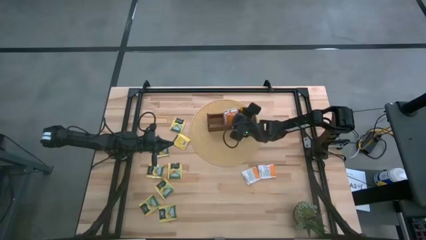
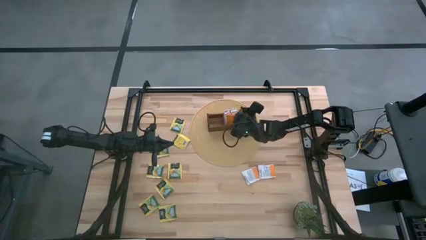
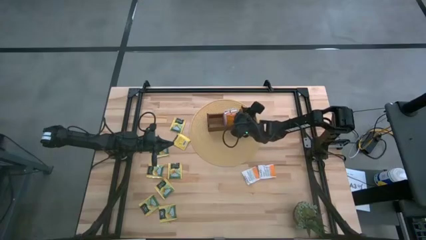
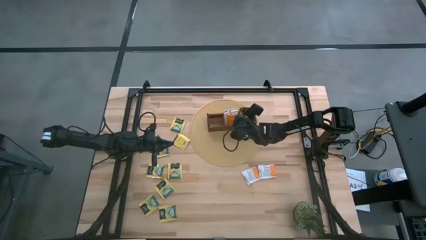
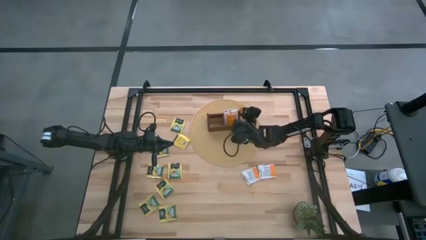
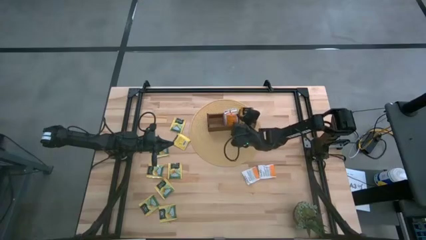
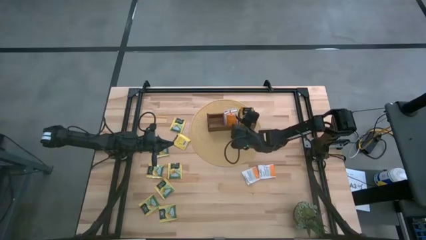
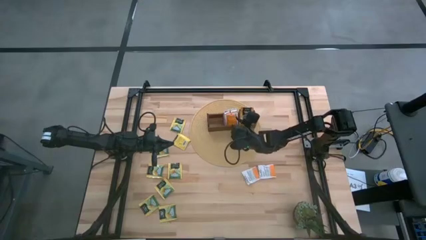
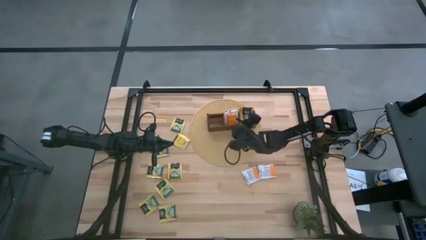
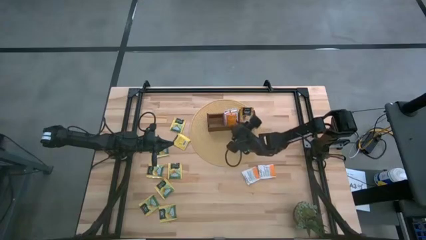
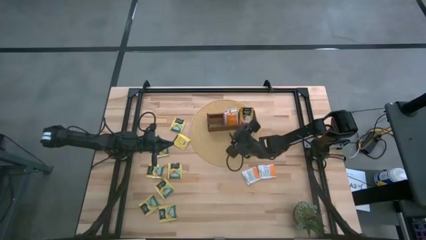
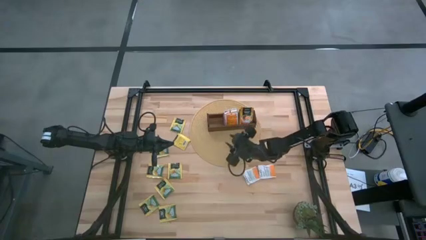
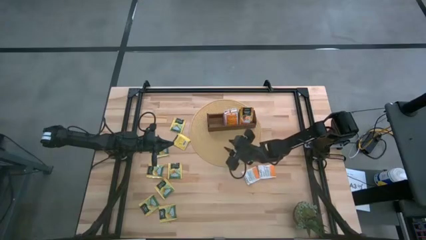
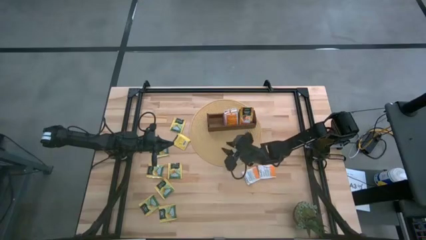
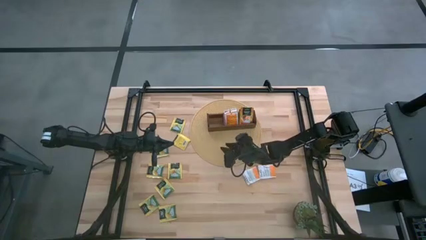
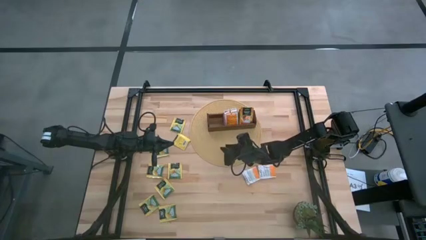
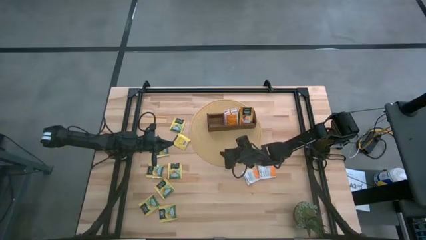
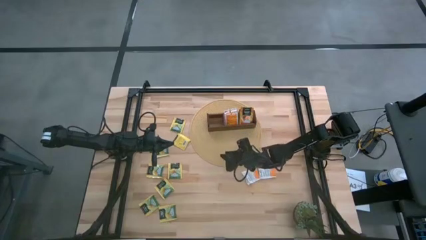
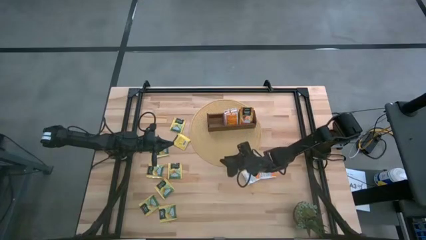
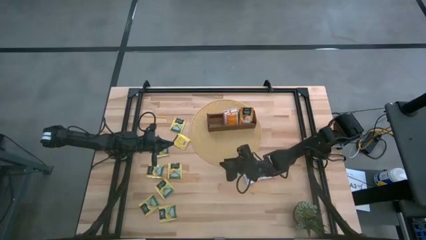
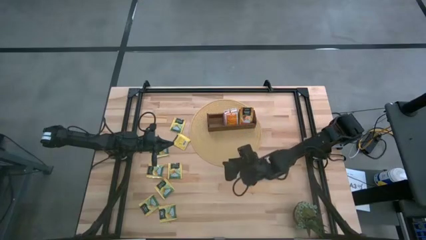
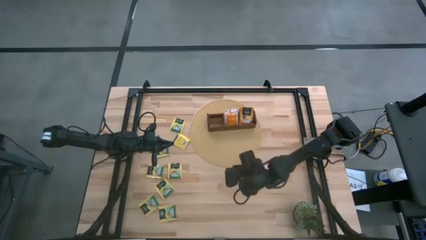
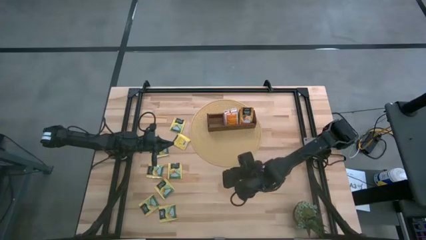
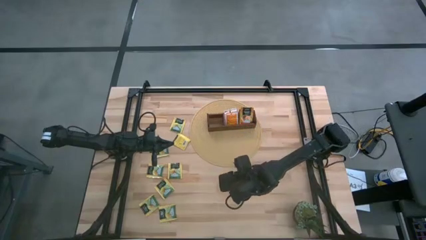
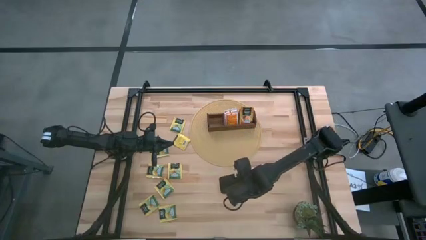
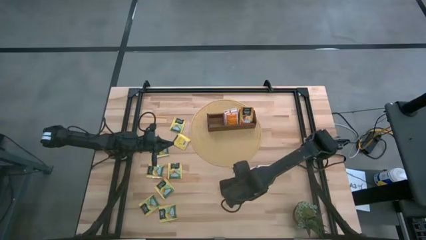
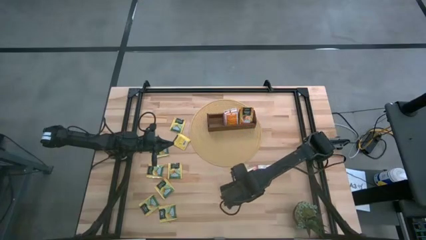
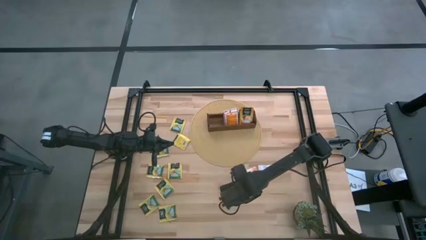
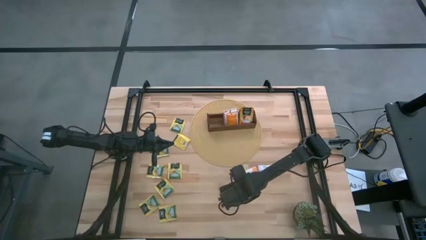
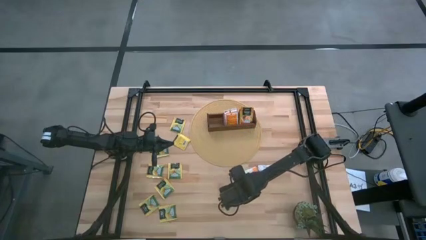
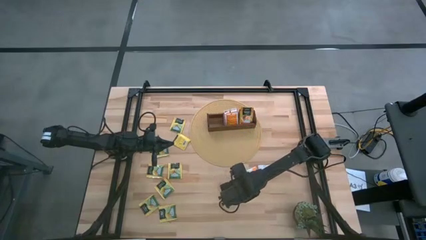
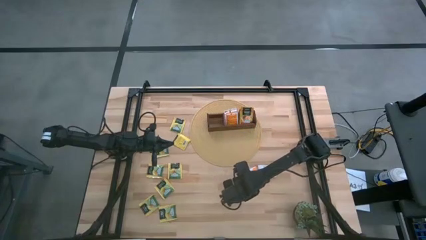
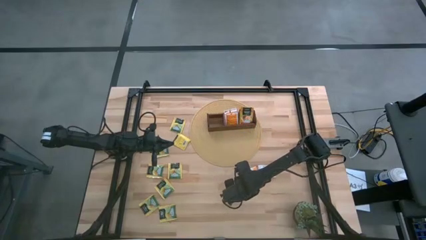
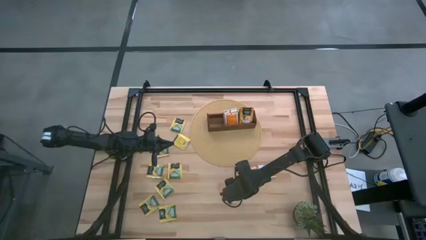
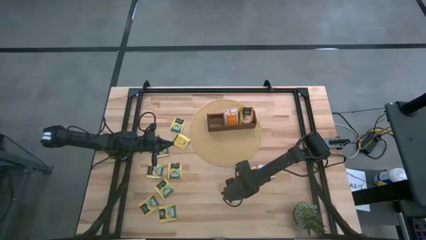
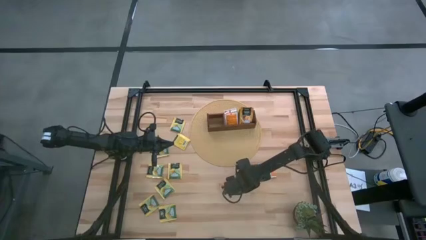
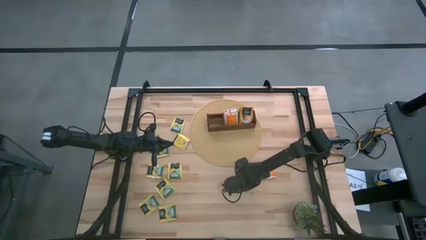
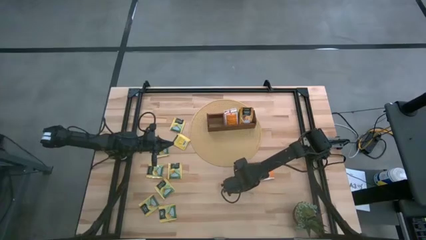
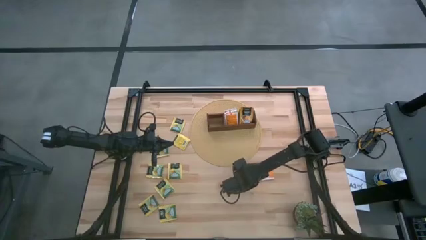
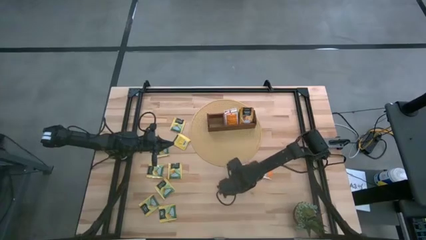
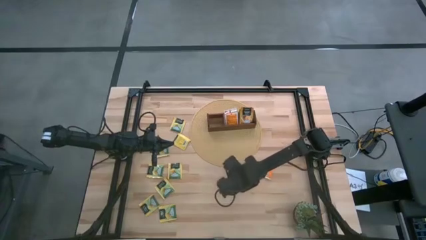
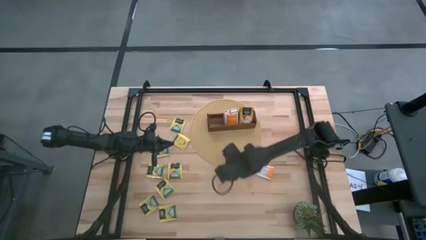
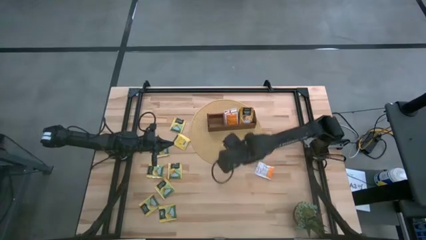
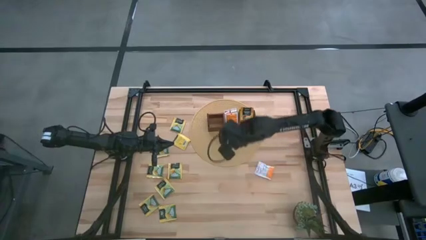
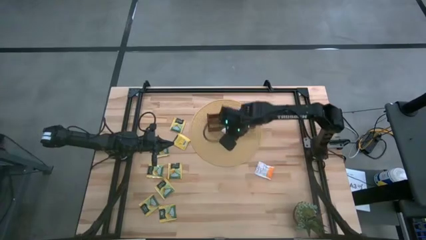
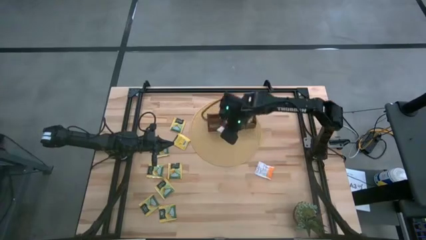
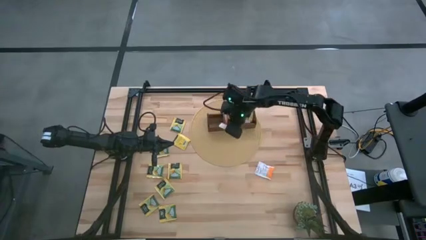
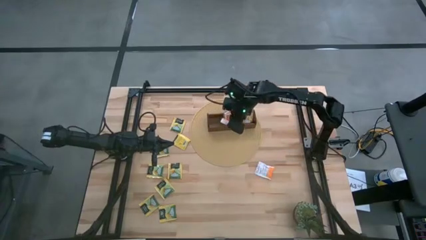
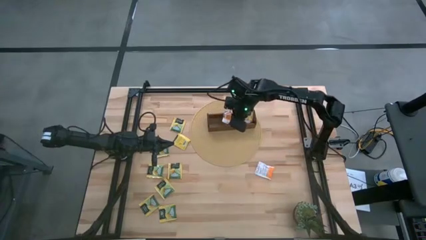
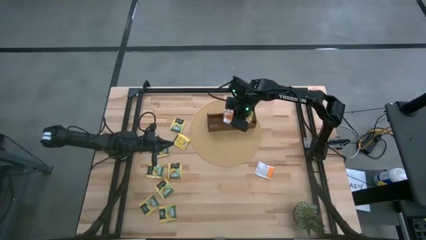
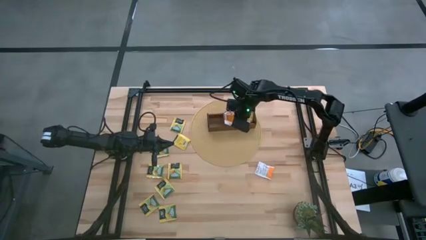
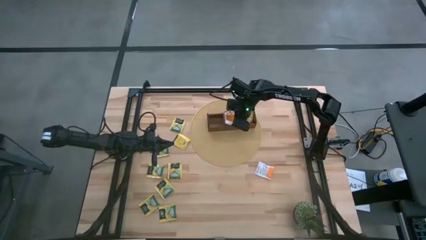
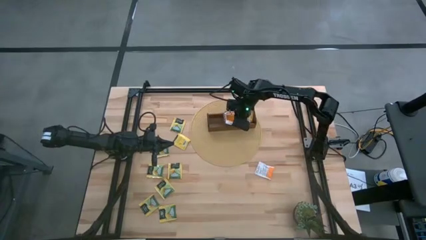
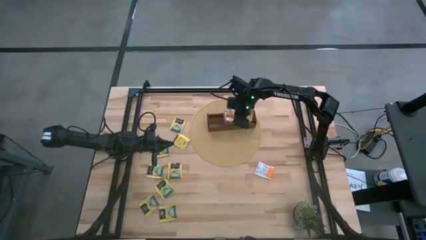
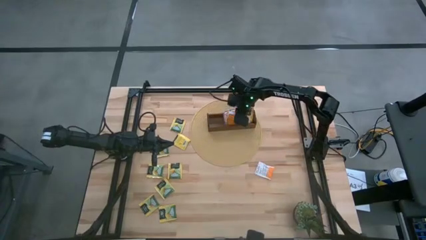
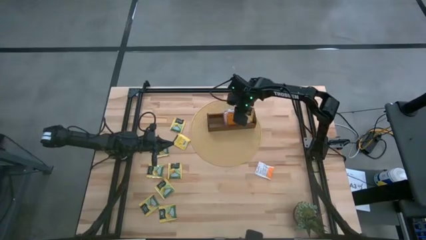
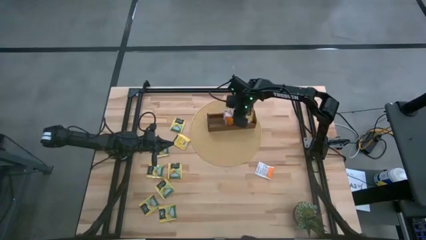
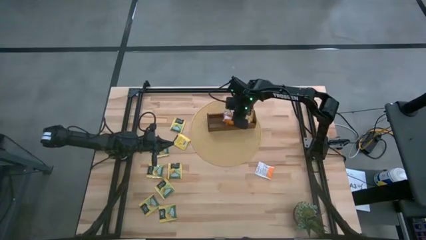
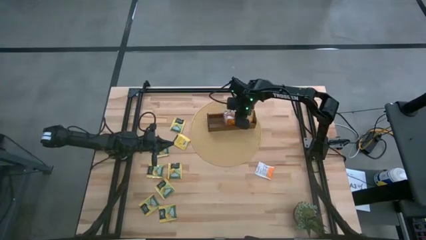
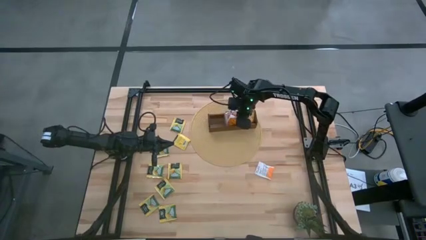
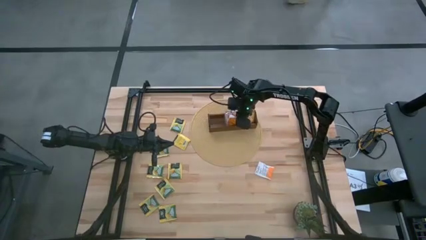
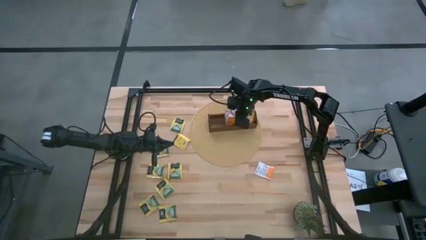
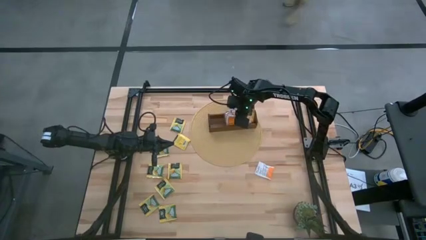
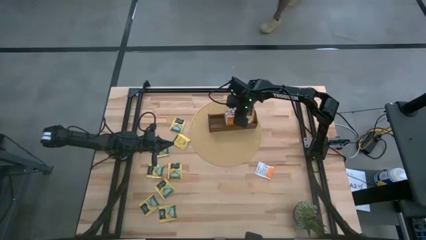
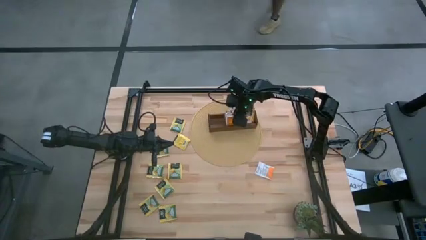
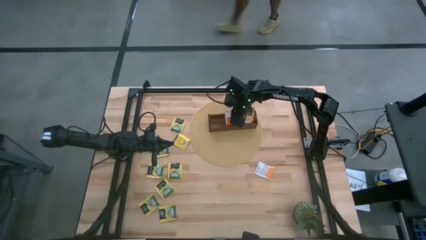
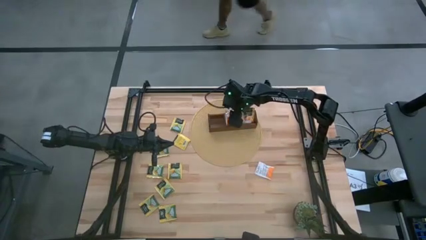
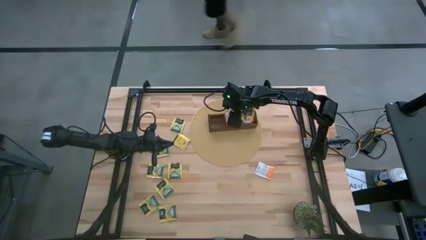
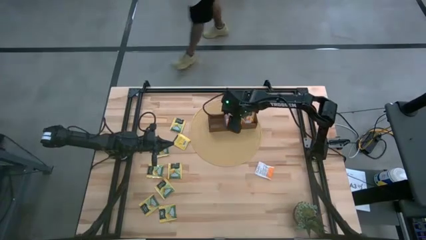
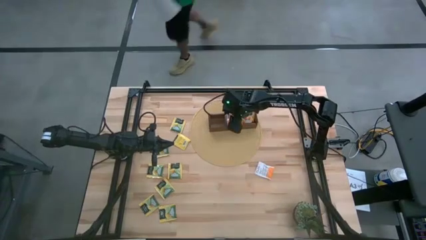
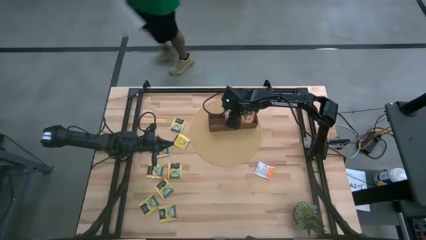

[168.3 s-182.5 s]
Task: Pick & Place Tea
Put the white tea bag into the middle section of the wooden organizer
